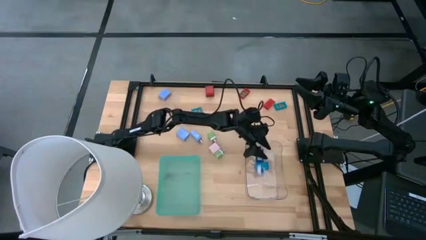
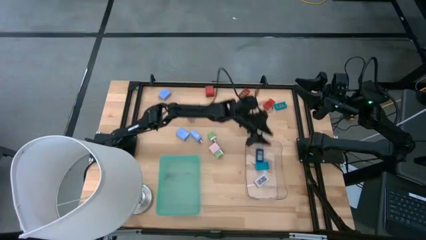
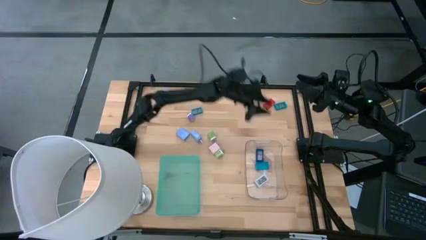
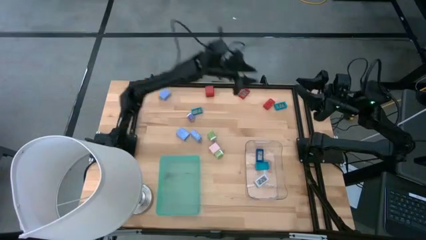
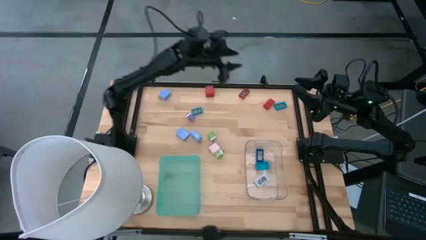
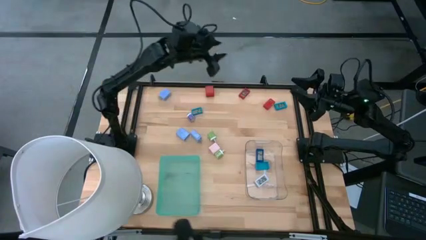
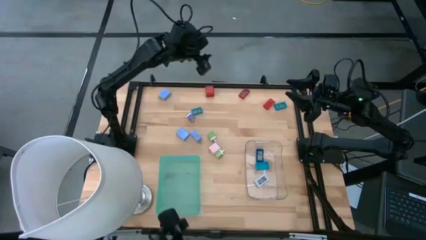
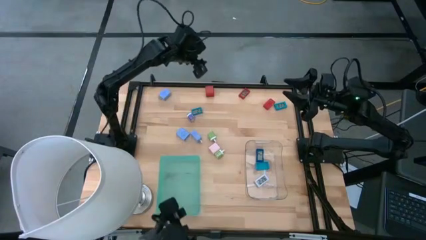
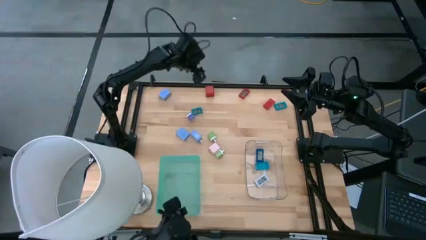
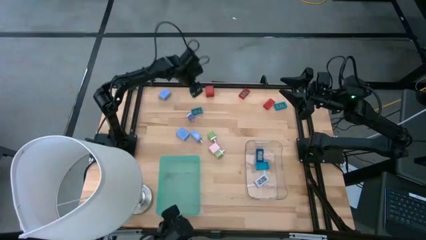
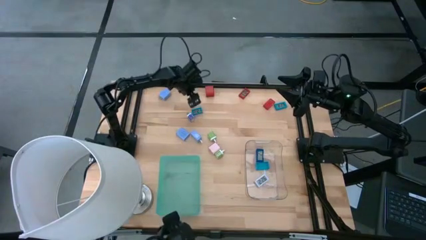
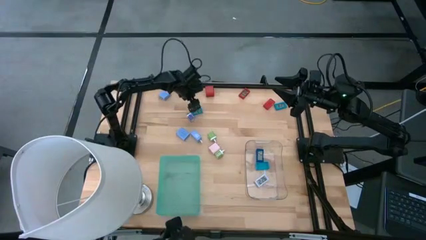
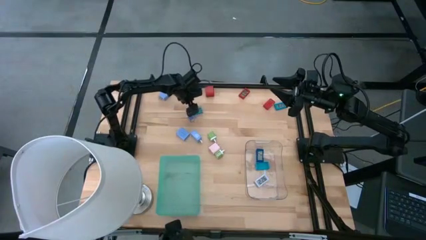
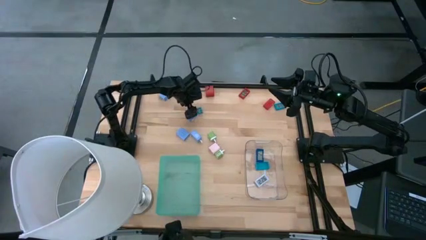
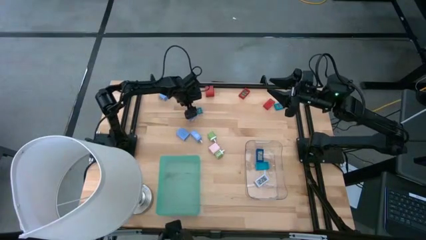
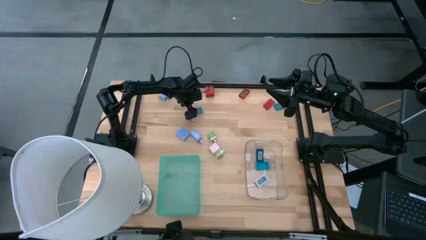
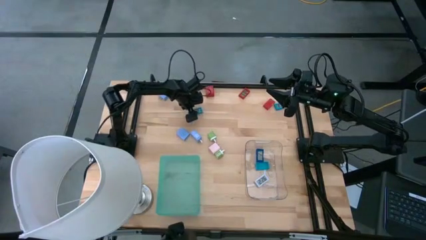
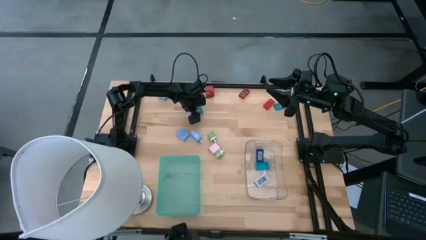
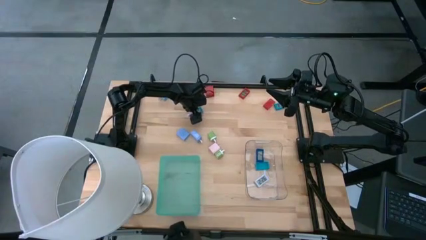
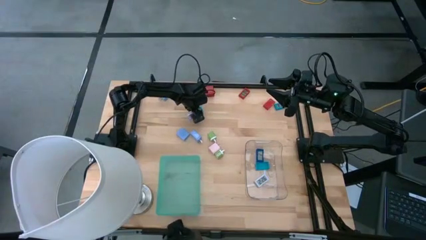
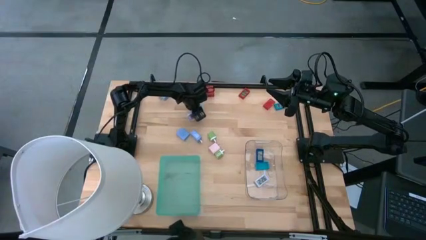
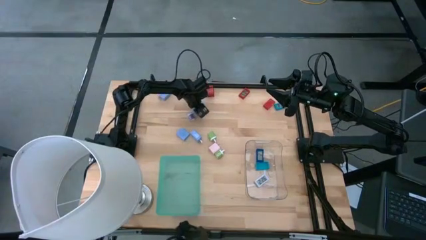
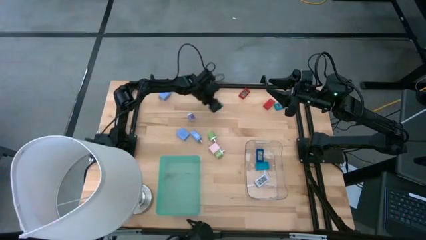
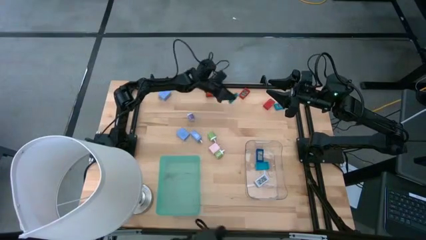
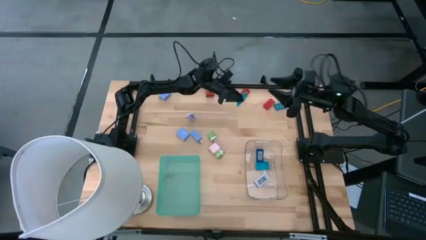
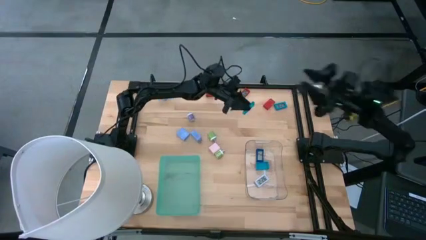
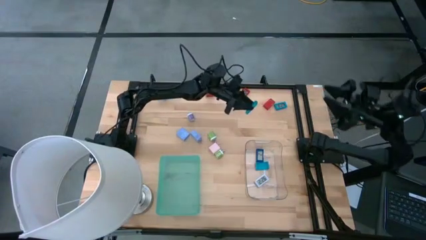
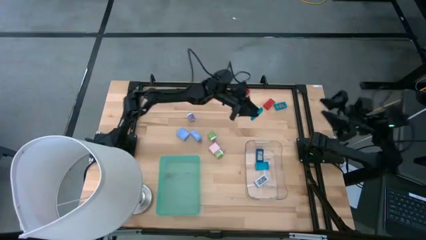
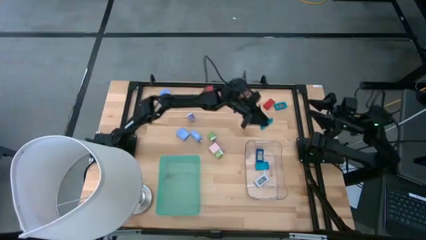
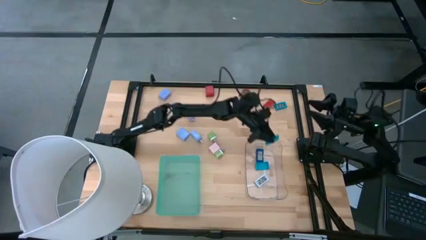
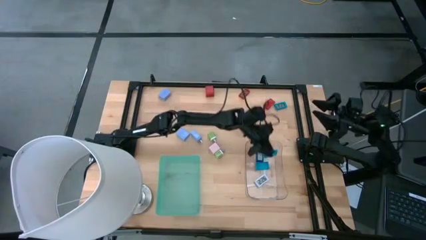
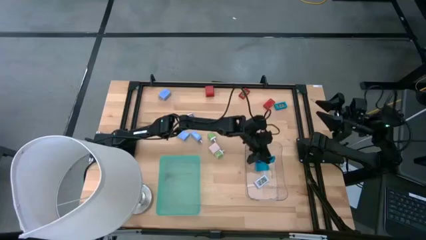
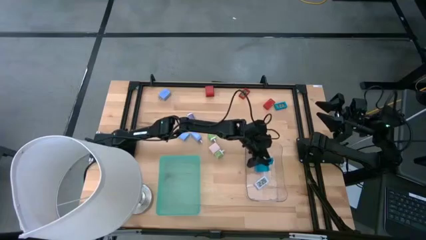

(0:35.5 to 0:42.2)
Task: Pick & Place Office items
Put the left light blue digital clock into the transparent bin

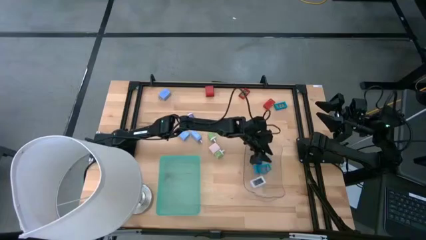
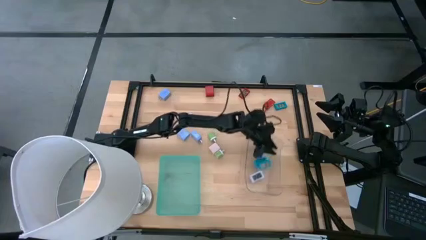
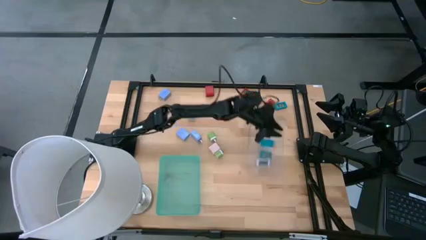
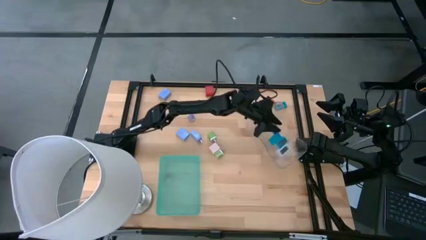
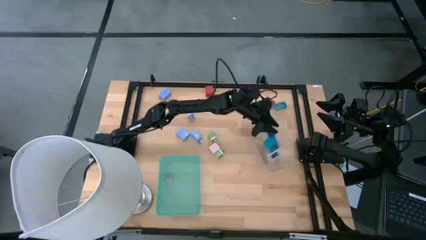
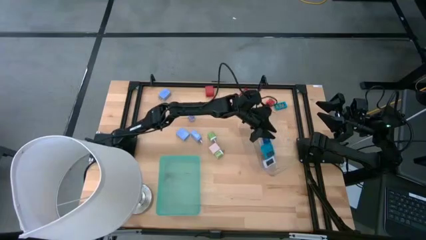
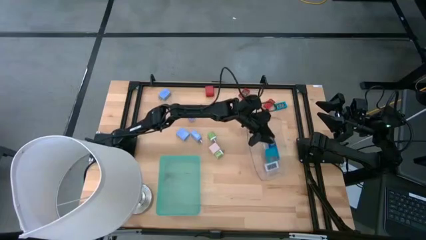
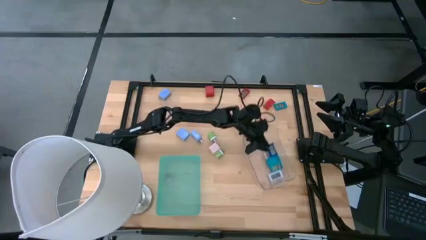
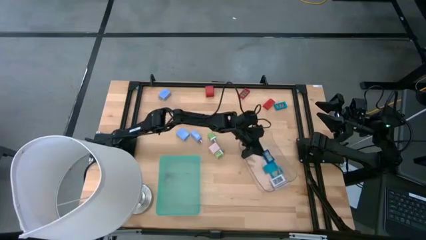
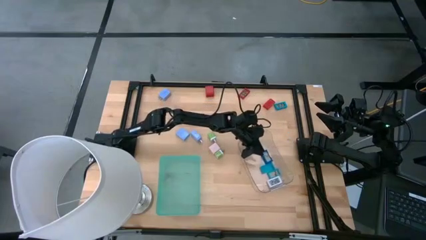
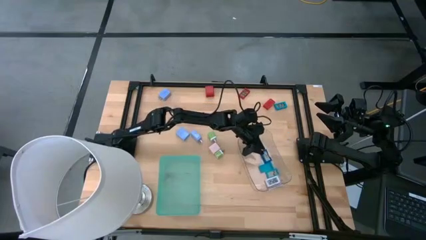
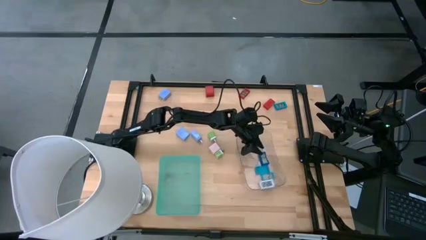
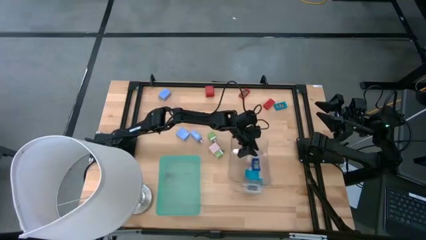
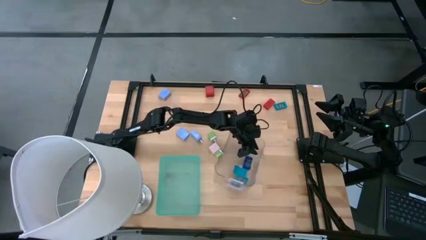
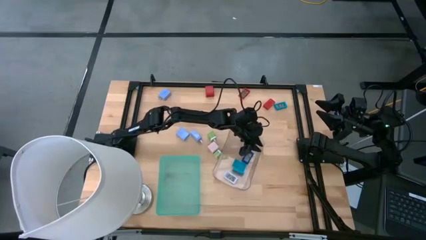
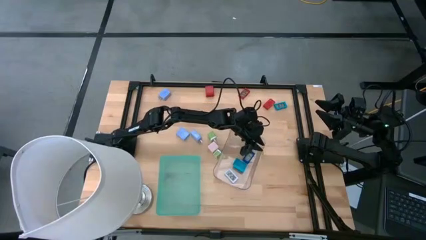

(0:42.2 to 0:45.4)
Adjust the transparent bin on the table

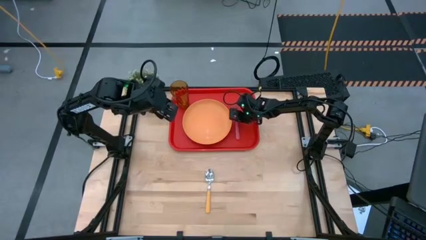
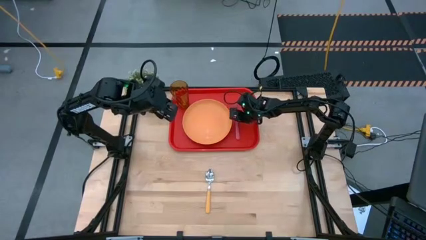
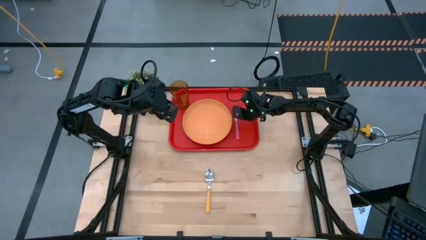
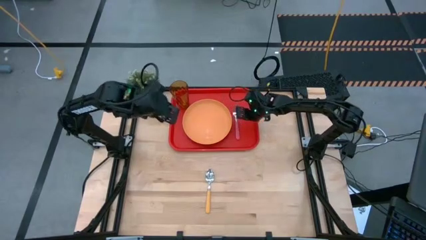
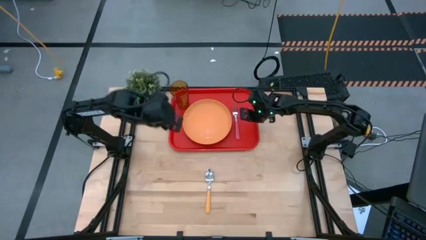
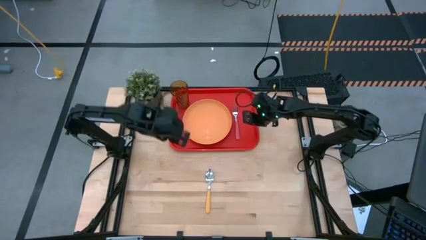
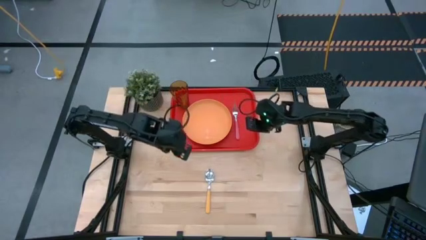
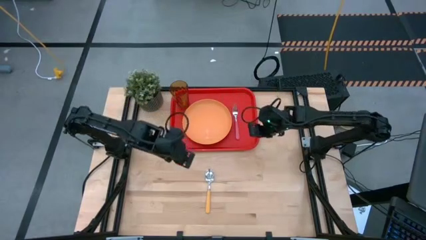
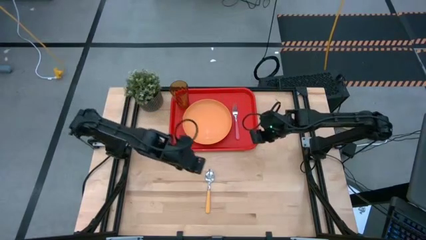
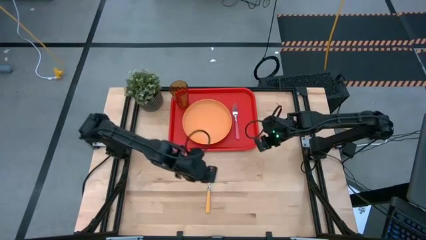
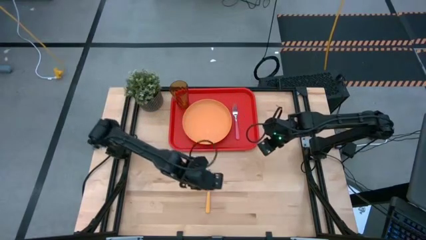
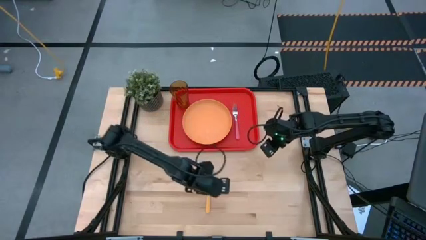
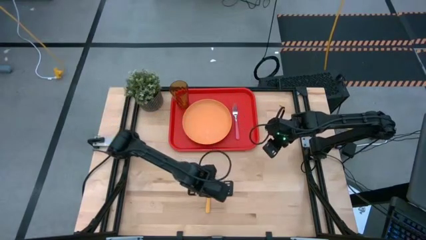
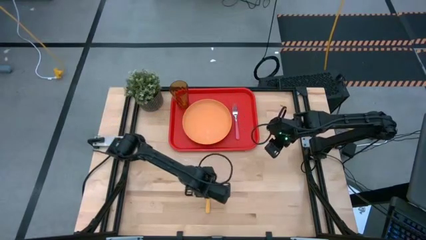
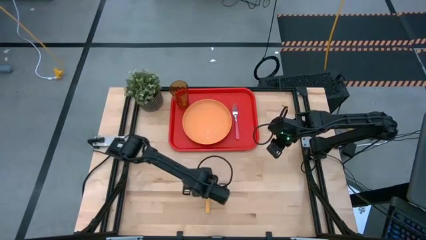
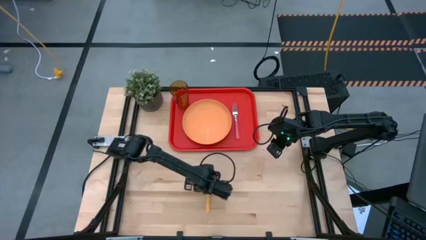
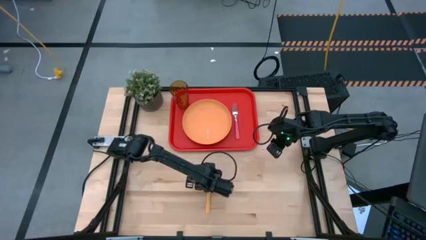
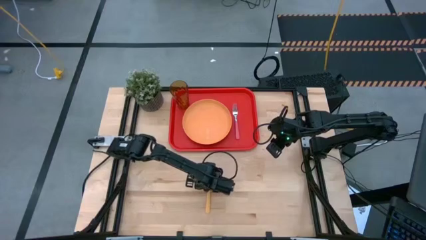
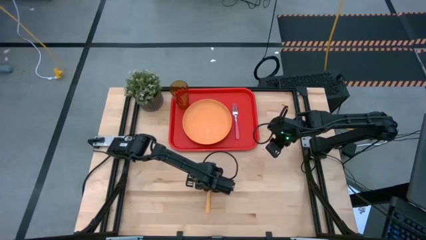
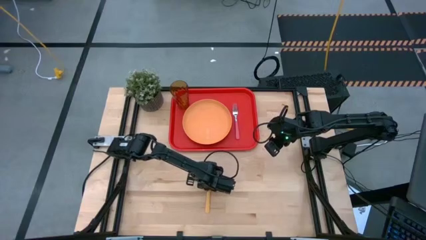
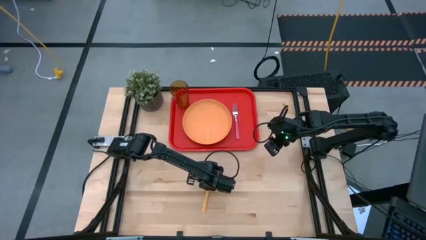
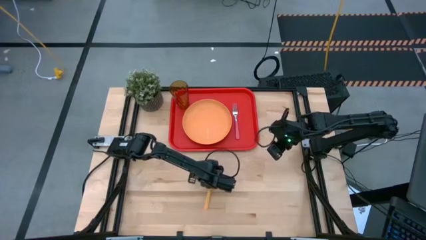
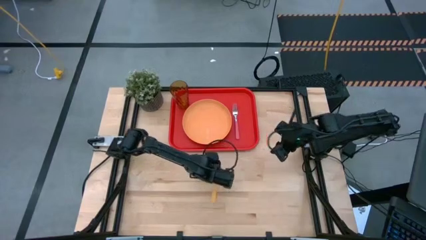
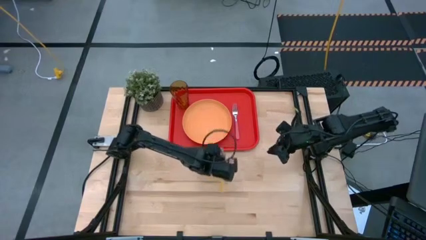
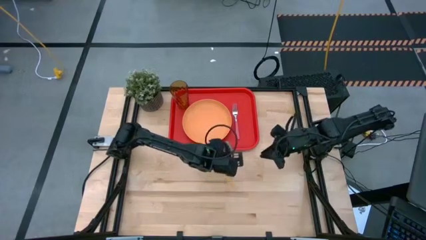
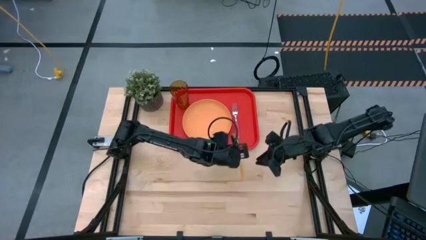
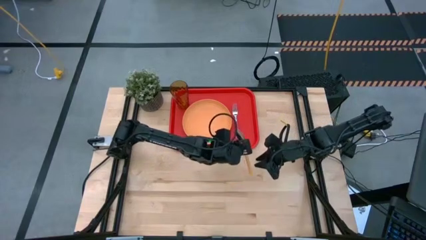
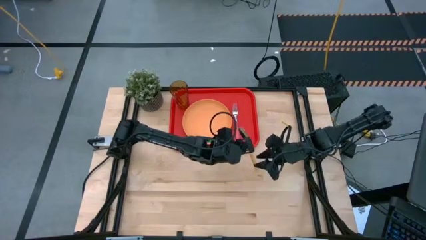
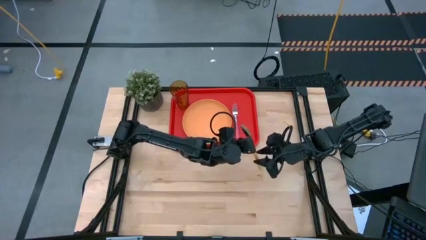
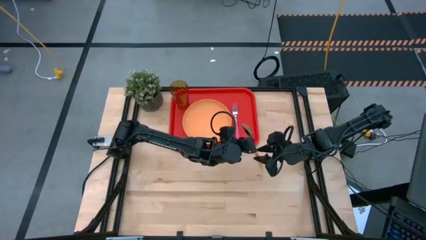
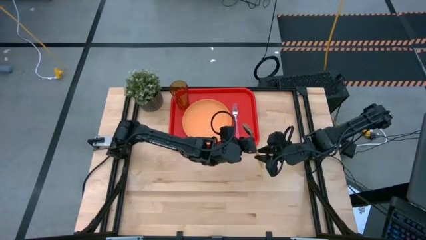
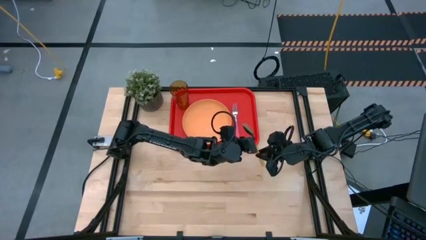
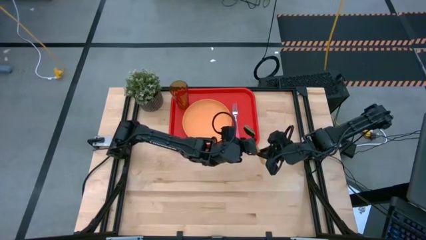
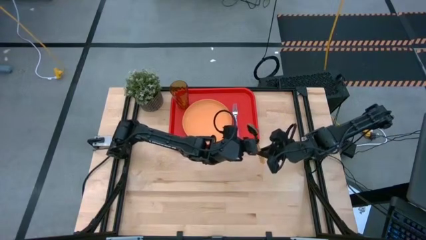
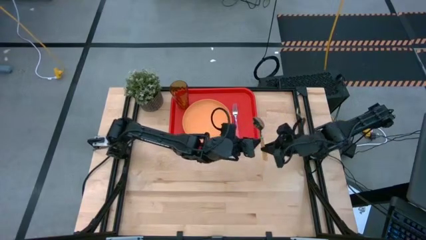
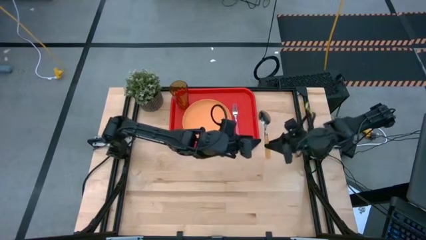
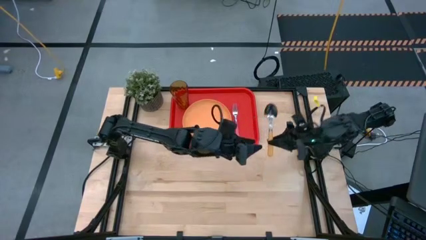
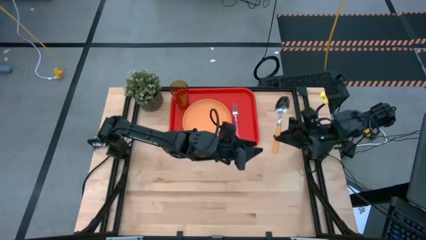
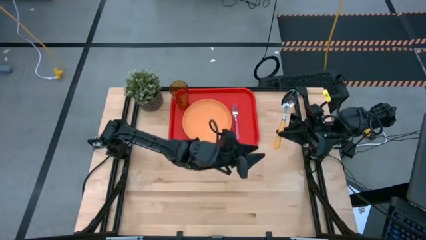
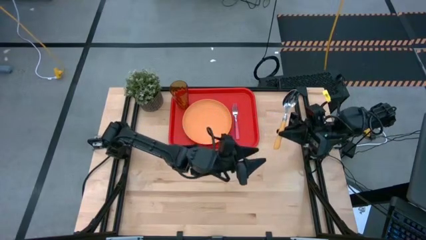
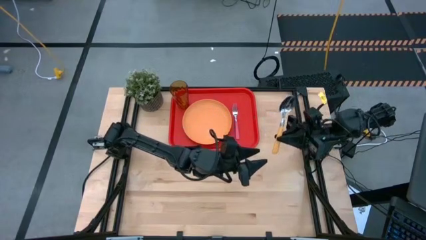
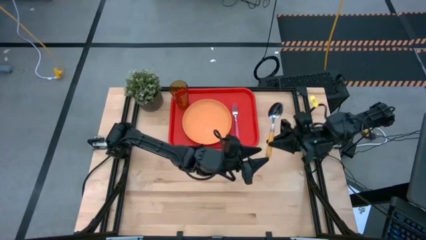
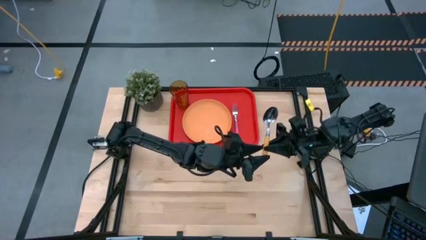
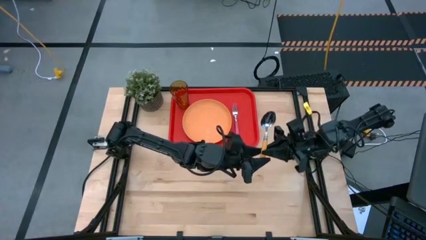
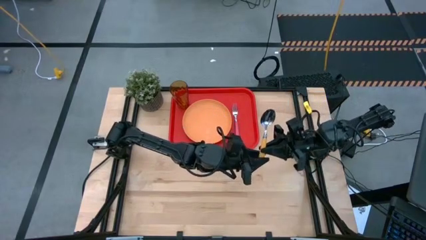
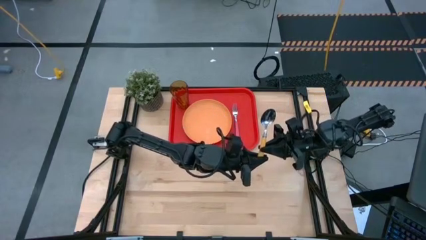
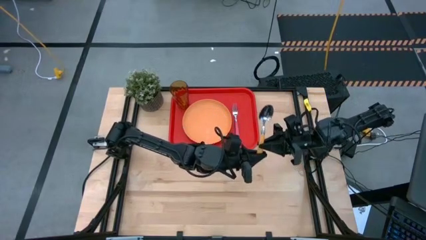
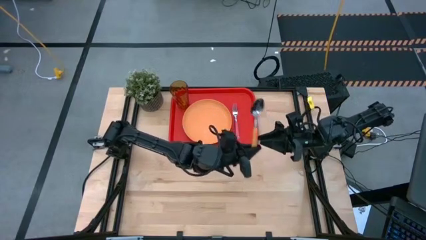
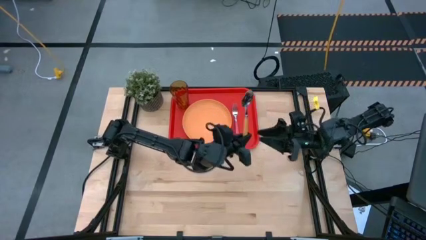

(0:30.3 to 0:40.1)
Task: Pick and place plate/cup/fork/spoon on tray
Put the yellow spoon on the red tray
